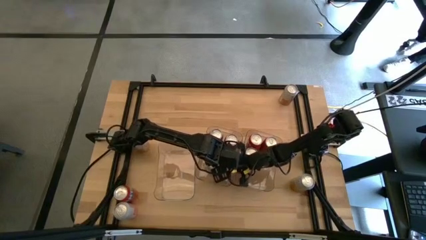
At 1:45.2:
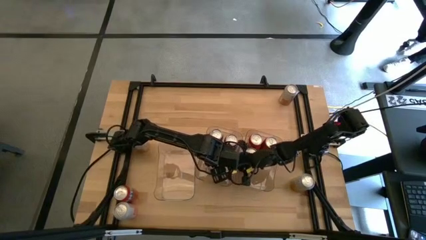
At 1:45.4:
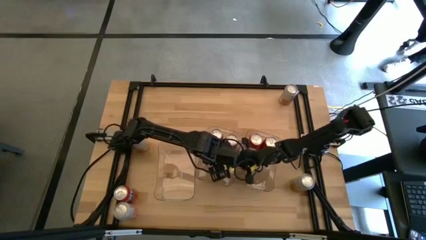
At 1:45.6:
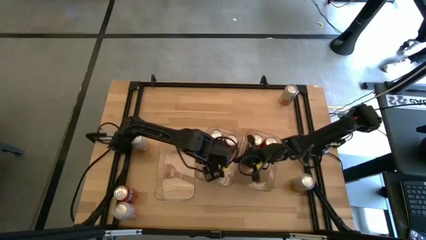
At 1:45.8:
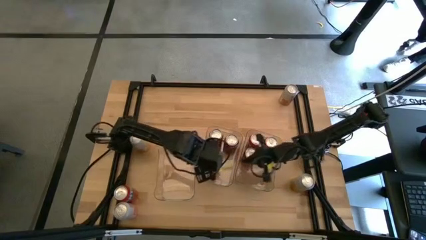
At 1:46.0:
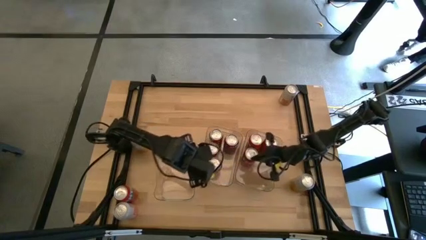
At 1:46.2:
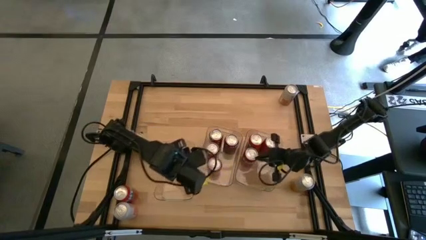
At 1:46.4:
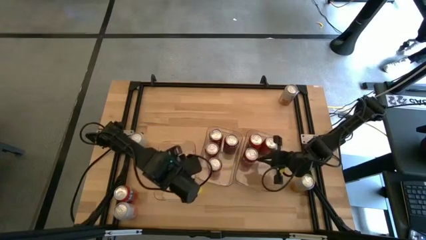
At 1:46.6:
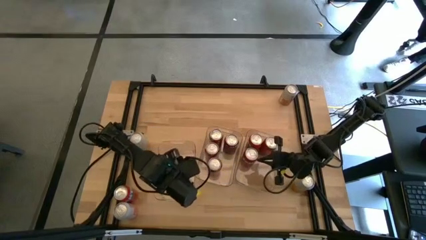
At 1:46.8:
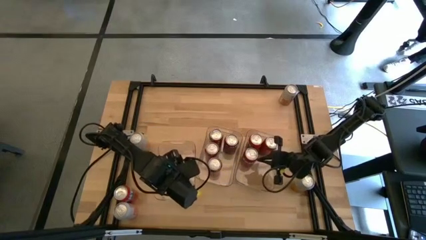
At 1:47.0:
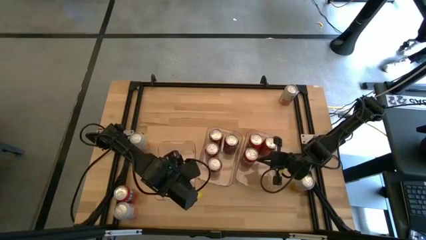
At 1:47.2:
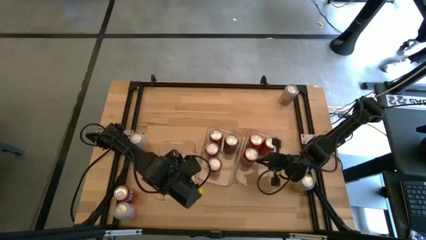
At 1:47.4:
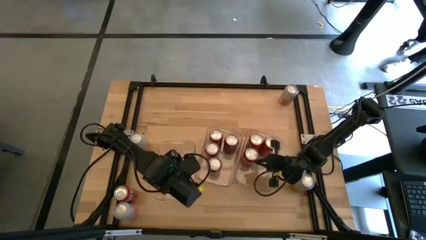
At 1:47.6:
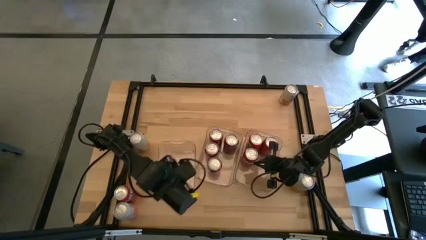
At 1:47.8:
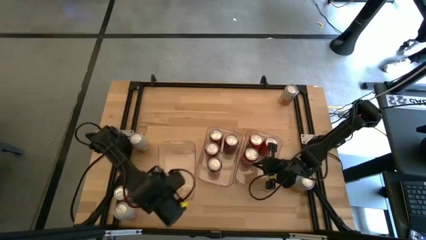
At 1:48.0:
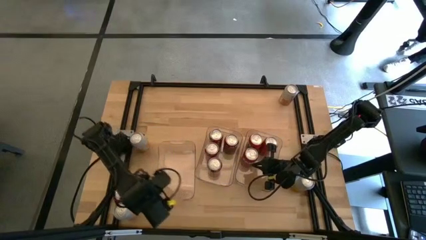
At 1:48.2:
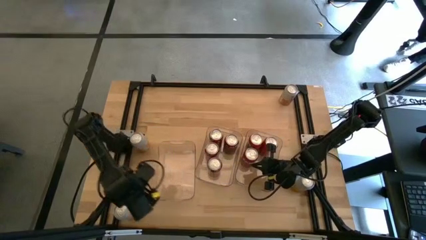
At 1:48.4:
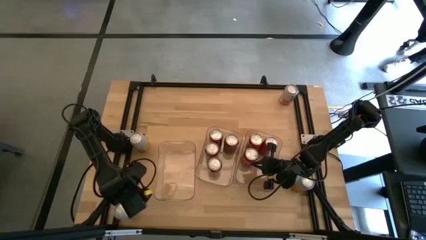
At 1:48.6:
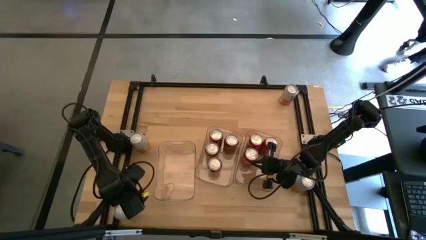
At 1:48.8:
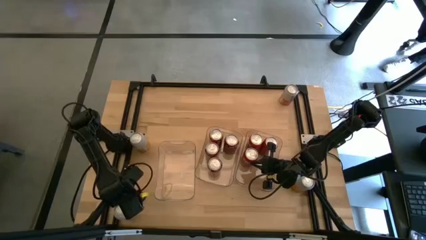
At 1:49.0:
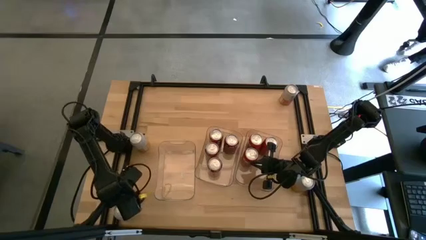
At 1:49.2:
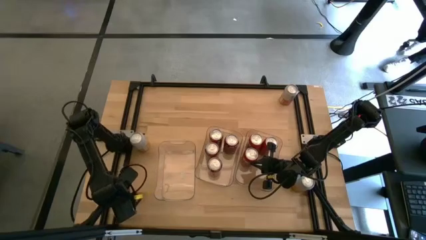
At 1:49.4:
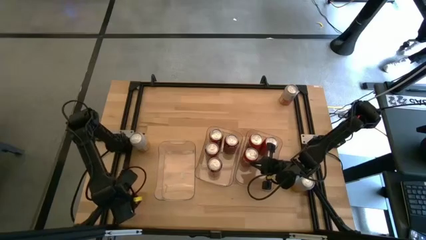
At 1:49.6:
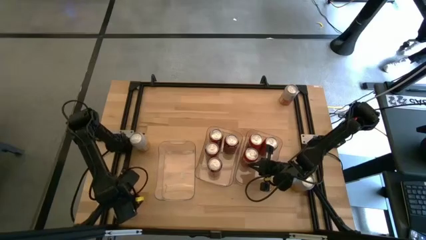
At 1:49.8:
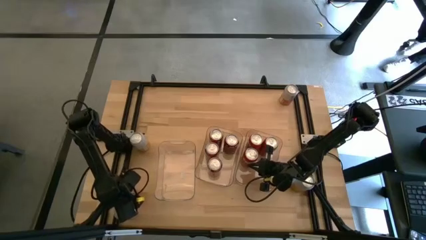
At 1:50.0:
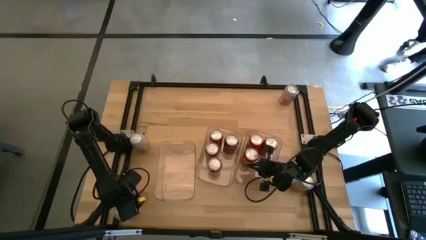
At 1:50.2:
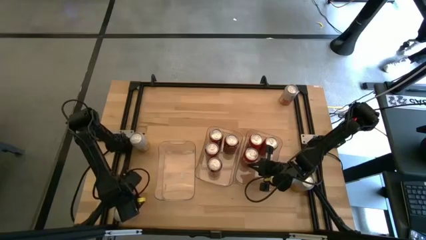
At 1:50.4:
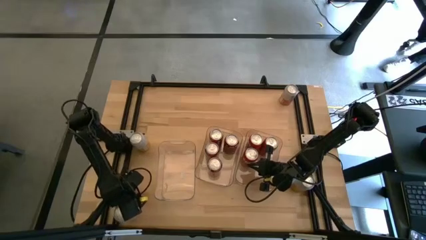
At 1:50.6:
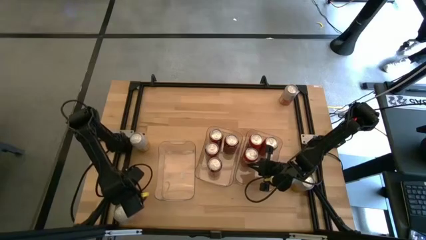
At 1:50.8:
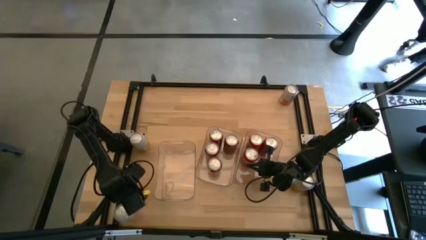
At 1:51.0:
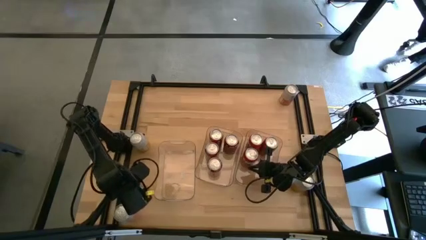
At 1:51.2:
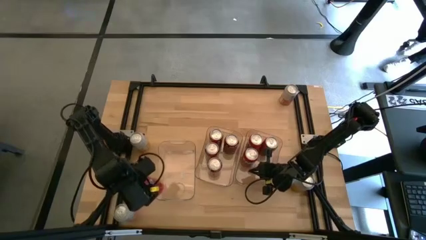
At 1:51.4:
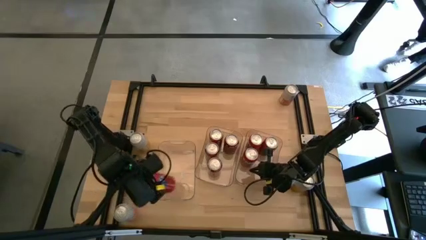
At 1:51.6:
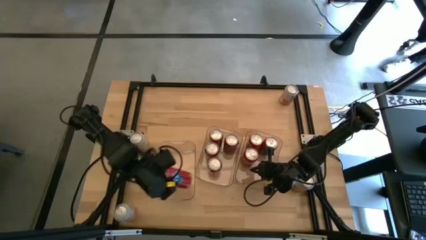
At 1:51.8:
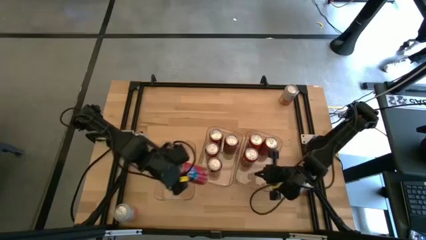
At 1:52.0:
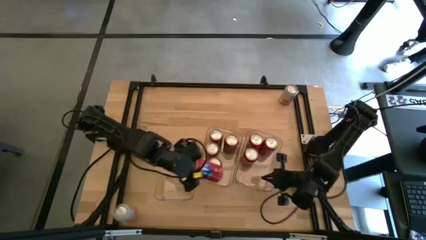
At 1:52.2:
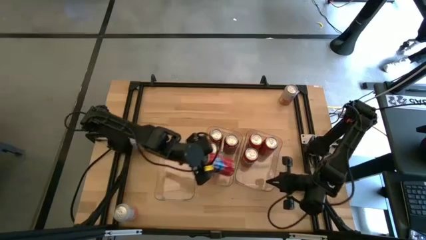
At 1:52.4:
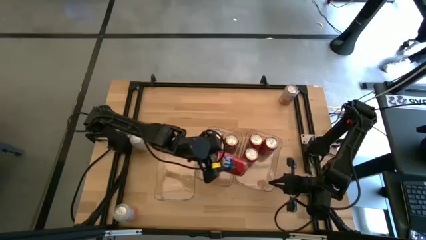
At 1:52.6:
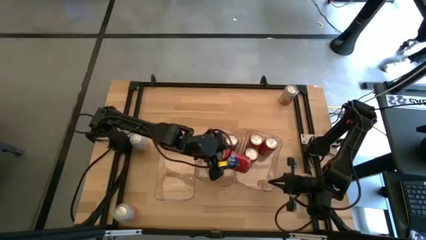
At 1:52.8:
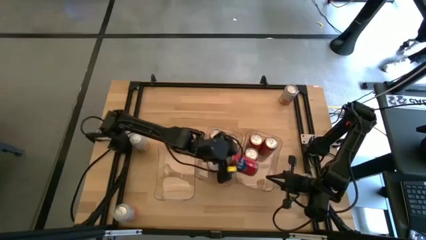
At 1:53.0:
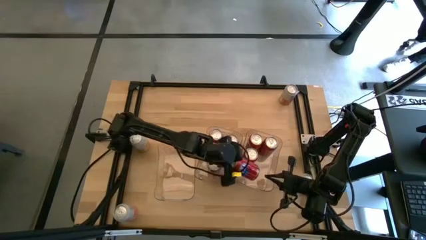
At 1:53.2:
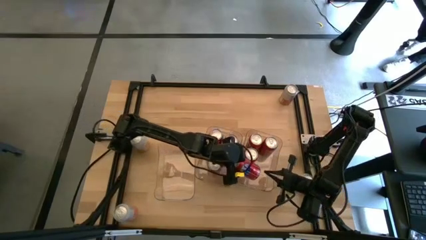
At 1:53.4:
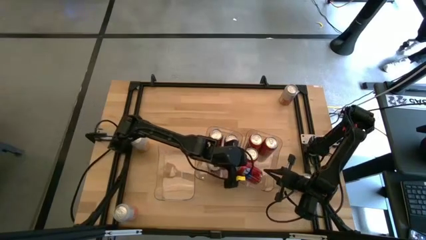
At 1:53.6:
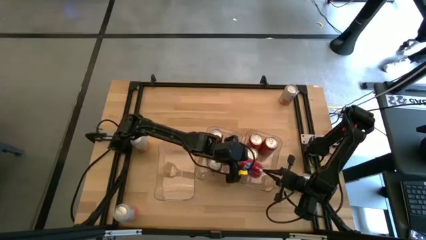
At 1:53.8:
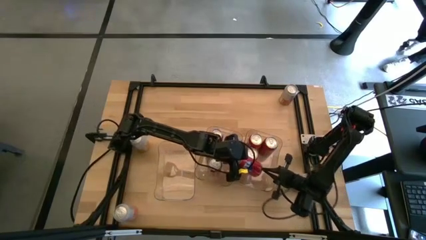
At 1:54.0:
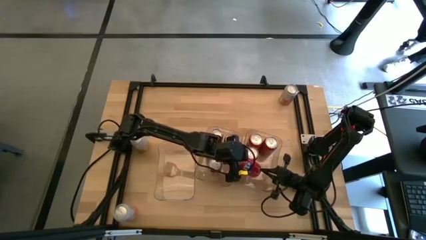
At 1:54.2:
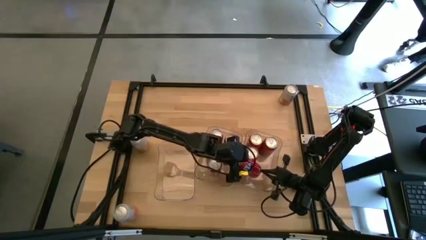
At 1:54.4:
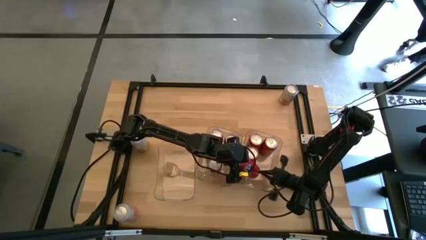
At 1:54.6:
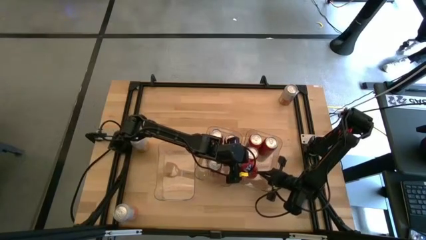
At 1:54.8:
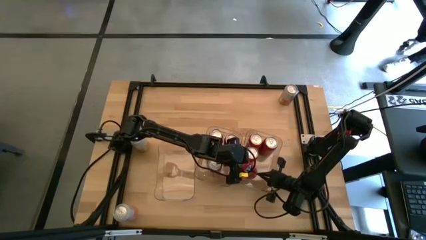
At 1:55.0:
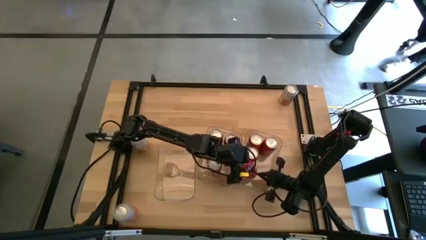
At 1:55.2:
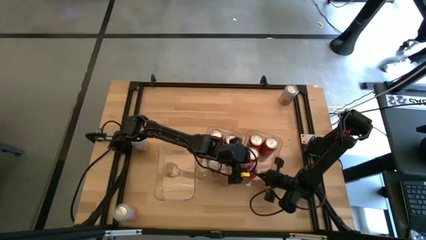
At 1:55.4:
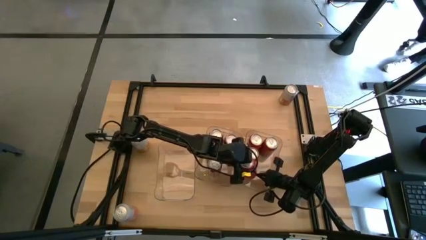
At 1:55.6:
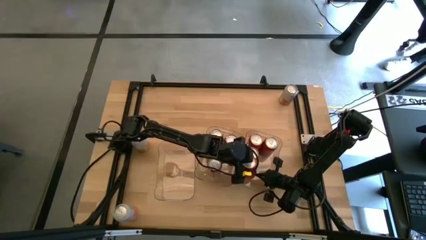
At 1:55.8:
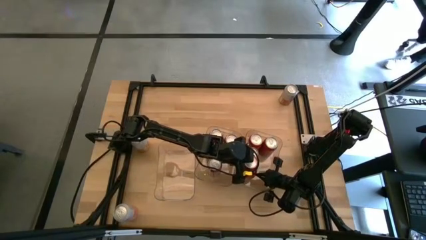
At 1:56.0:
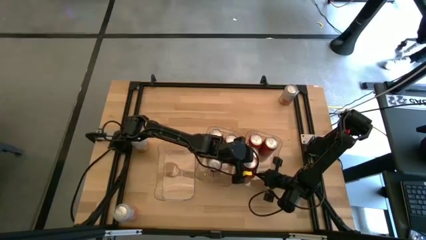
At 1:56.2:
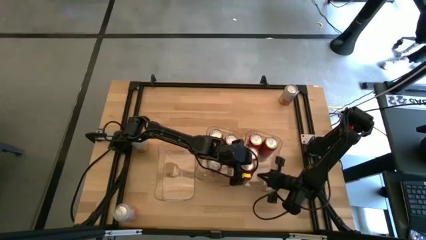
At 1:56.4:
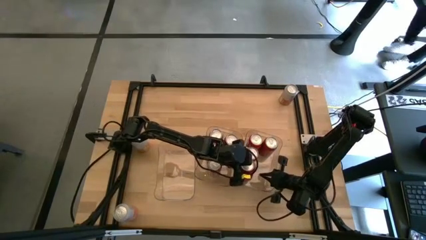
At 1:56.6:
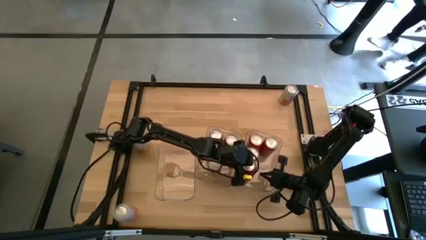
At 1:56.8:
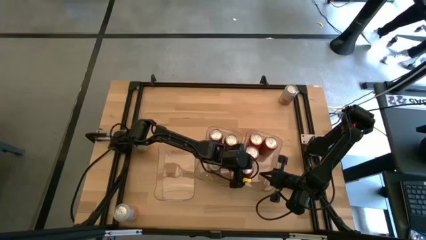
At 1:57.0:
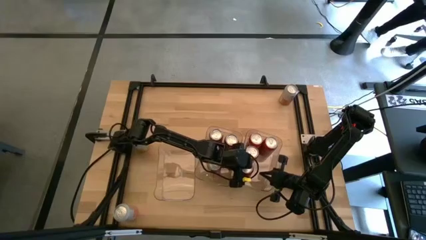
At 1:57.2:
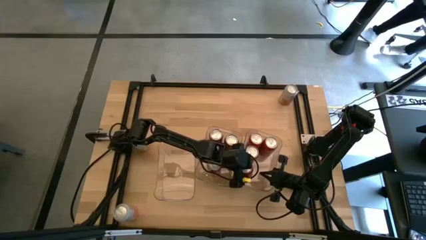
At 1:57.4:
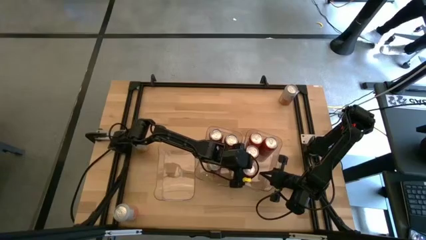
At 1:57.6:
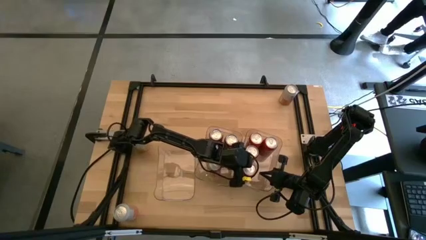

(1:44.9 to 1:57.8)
Task: Sort soda cans
Put the red soda can into the right transparent bin

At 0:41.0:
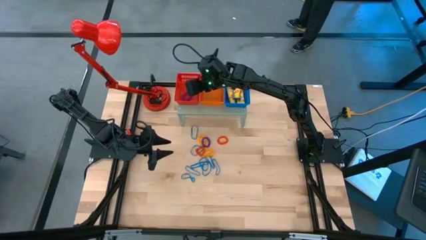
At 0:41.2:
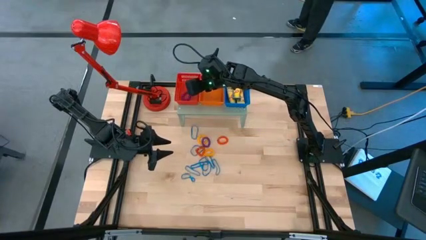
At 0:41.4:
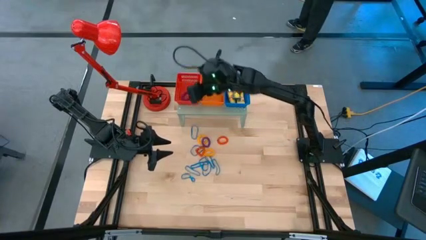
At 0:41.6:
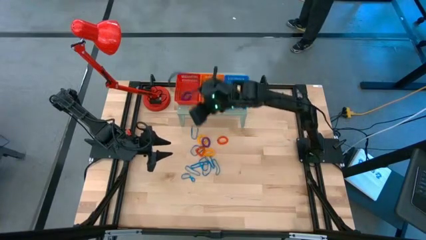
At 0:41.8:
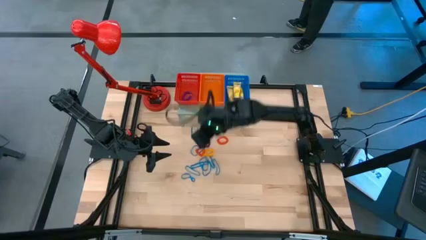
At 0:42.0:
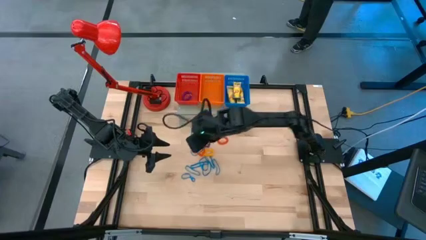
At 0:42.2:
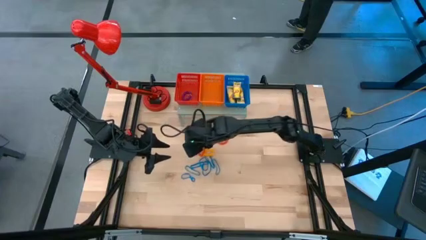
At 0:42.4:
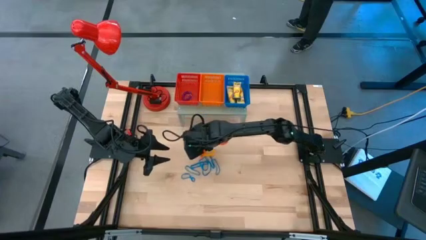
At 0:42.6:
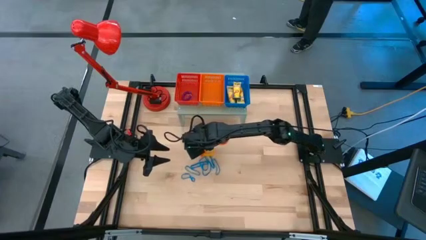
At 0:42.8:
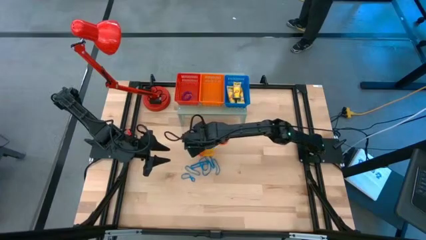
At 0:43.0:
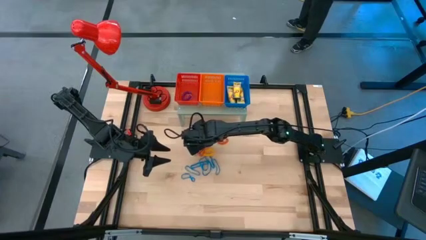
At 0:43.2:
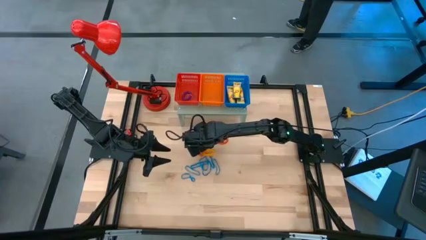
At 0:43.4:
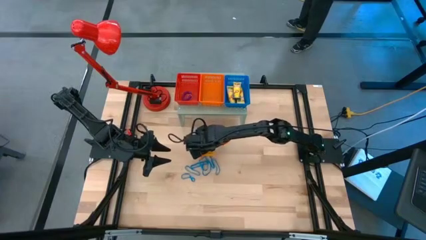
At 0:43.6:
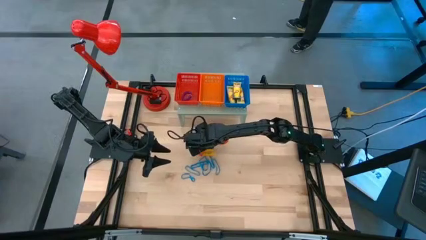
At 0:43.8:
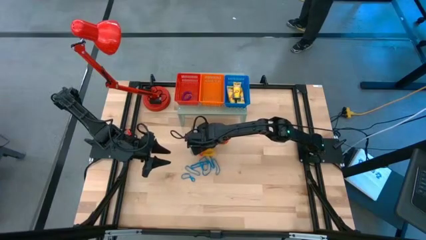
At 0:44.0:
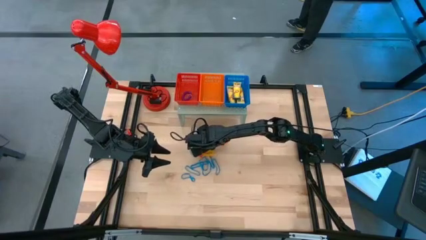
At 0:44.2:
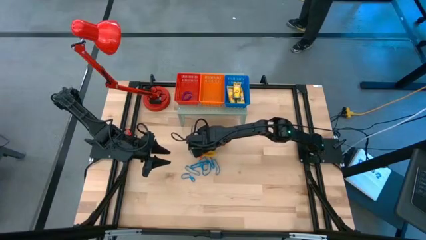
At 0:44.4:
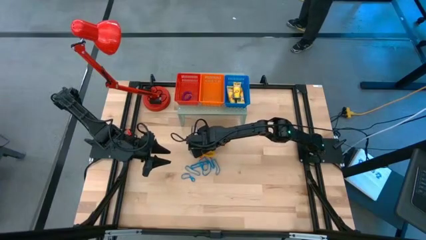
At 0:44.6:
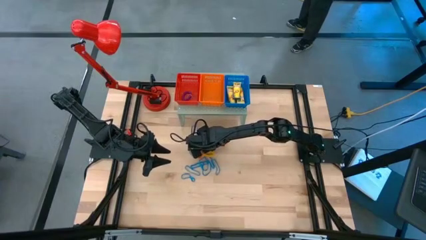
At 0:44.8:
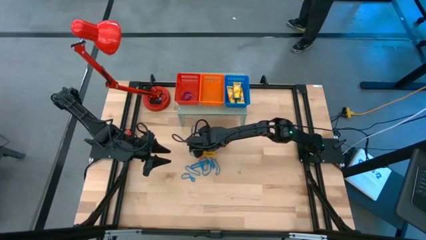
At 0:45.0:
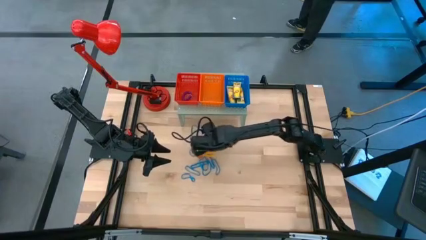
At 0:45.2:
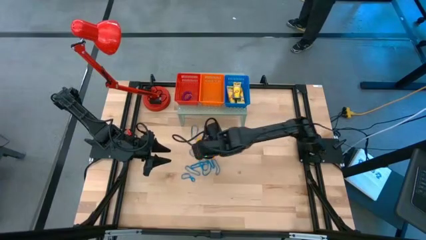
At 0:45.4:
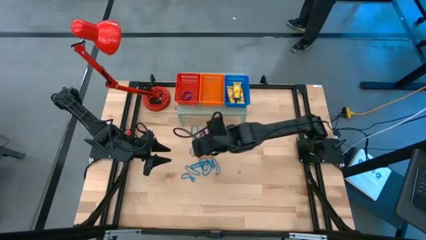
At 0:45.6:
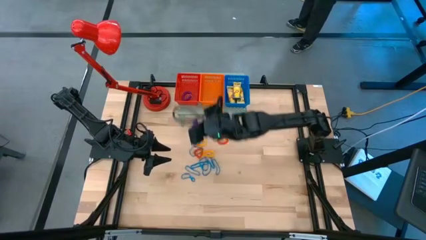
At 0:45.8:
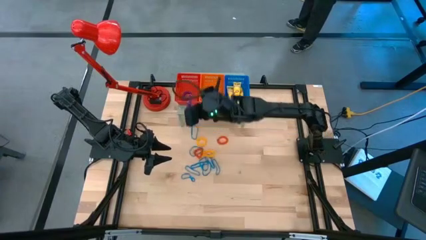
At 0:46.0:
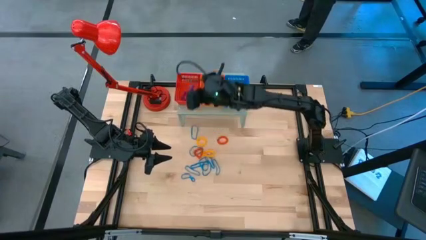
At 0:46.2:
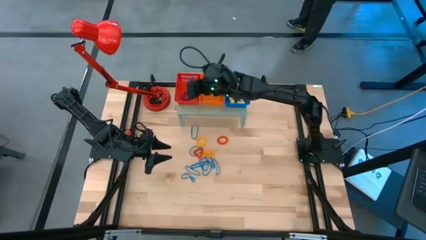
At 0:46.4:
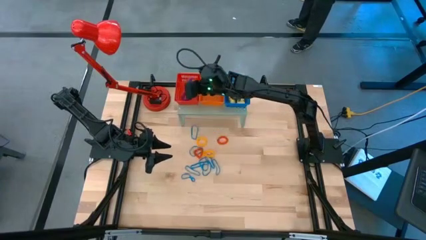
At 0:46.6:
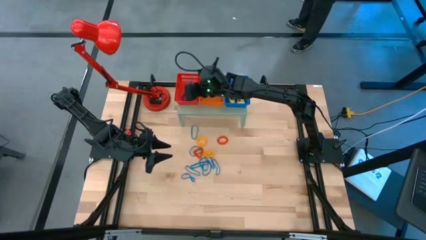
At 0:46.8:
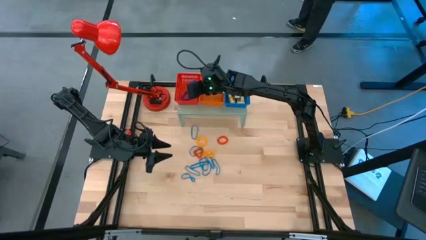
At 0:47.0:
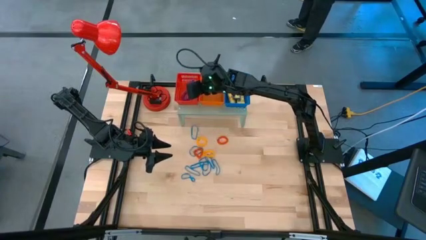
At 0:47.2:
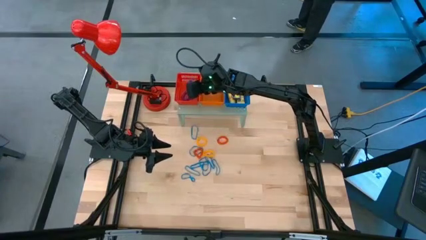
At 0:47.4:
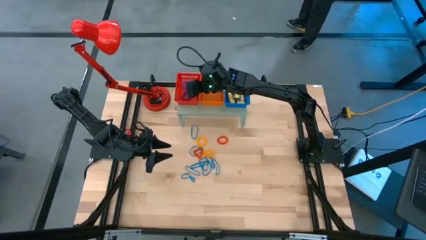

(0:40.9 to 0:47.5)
Task: Pick & Place Office Desk Supplies
Put the violet spring keychain into the red bin on the shelf
